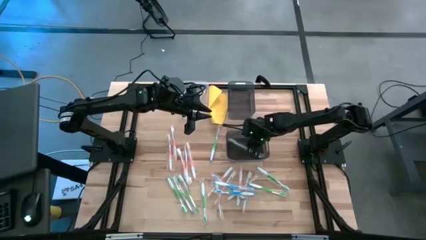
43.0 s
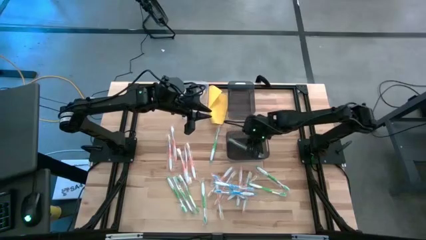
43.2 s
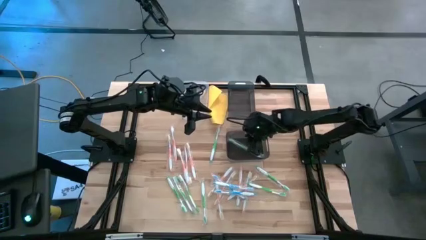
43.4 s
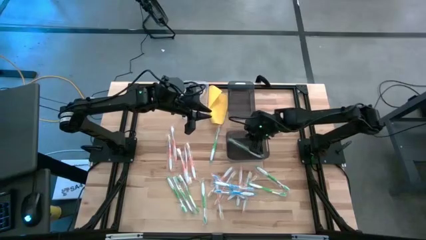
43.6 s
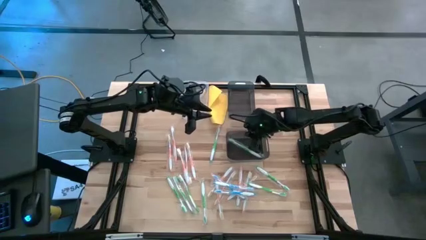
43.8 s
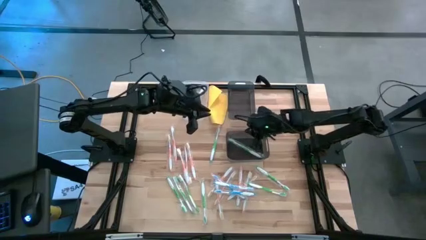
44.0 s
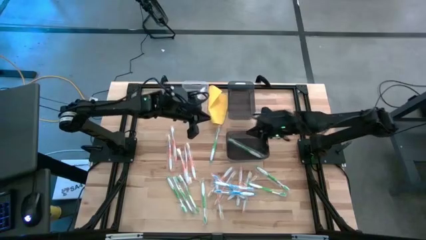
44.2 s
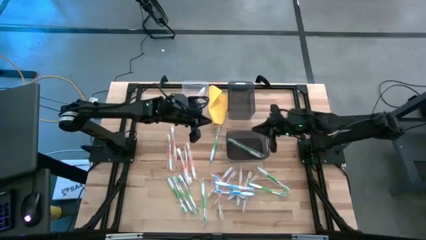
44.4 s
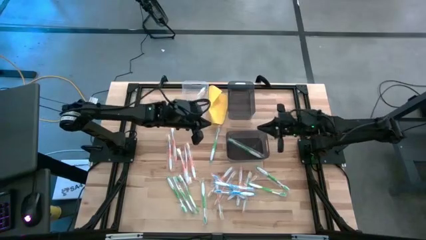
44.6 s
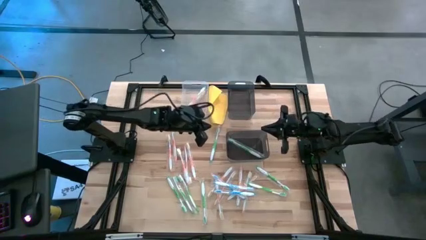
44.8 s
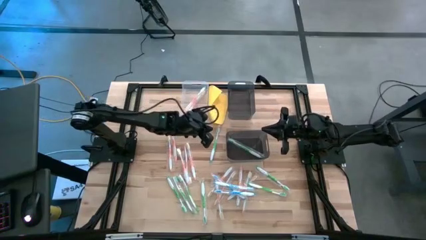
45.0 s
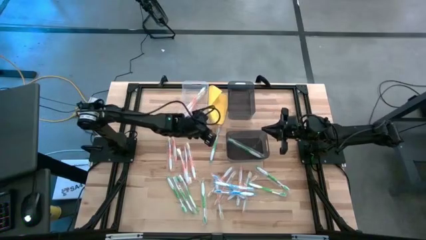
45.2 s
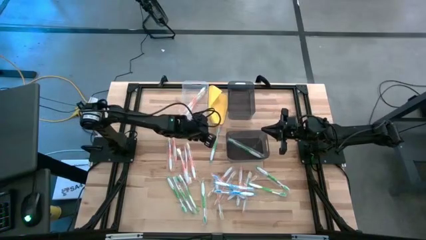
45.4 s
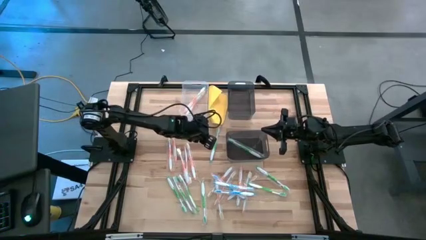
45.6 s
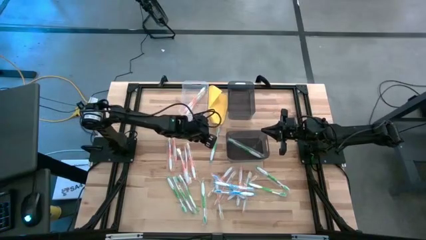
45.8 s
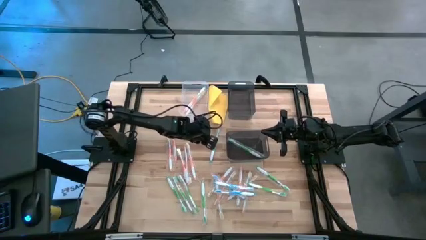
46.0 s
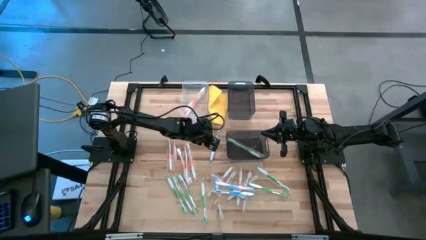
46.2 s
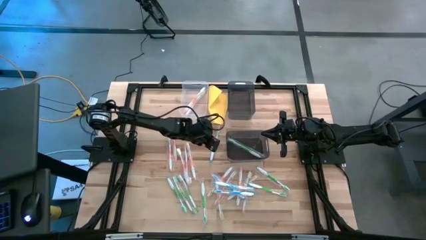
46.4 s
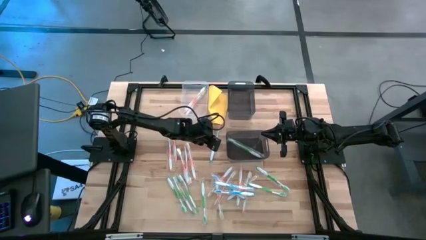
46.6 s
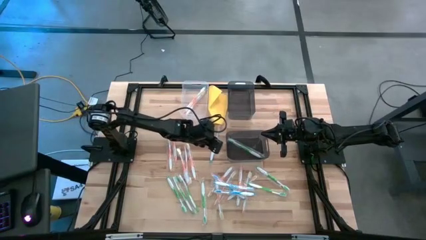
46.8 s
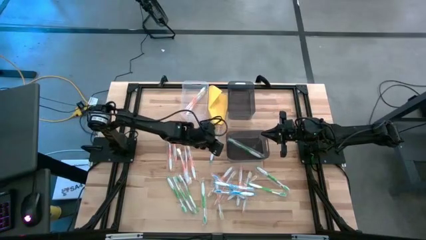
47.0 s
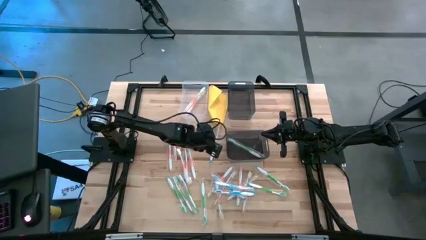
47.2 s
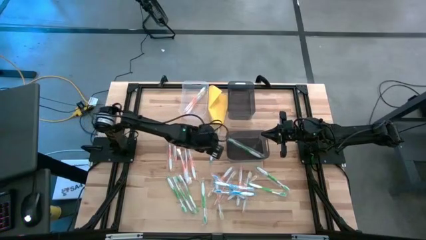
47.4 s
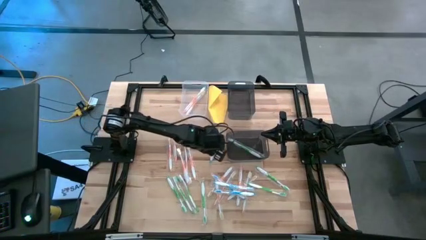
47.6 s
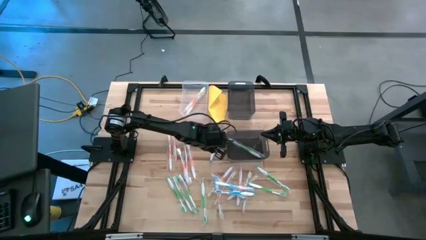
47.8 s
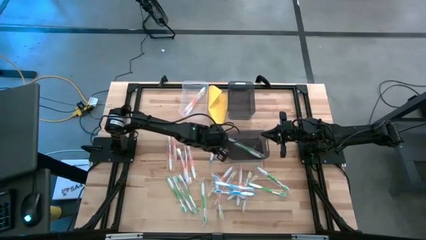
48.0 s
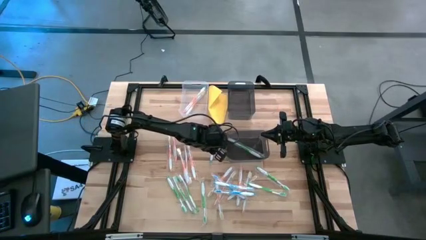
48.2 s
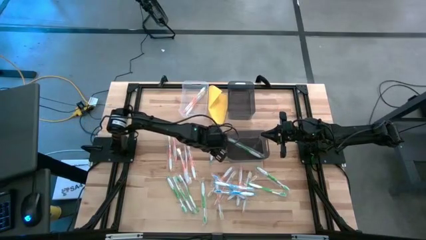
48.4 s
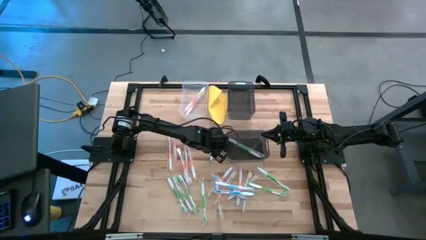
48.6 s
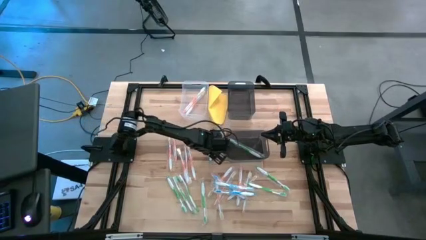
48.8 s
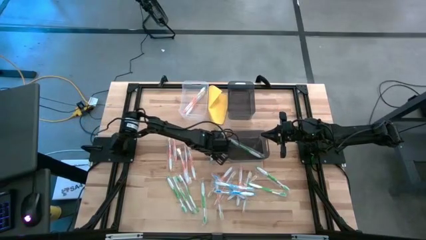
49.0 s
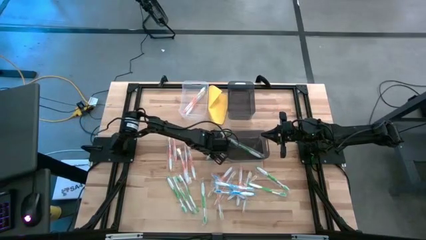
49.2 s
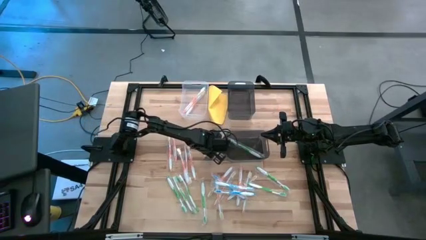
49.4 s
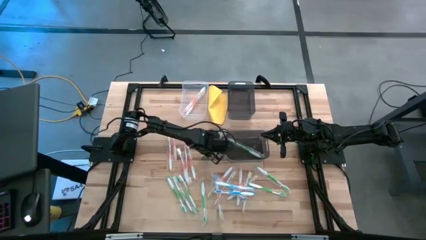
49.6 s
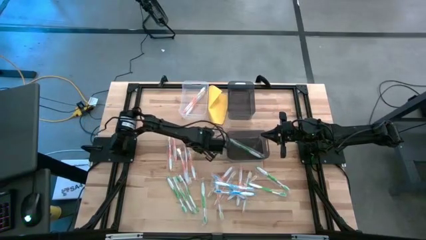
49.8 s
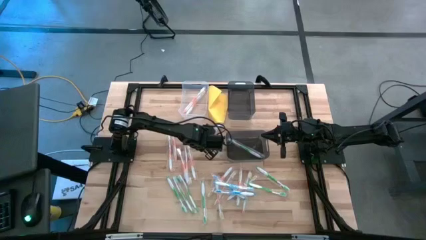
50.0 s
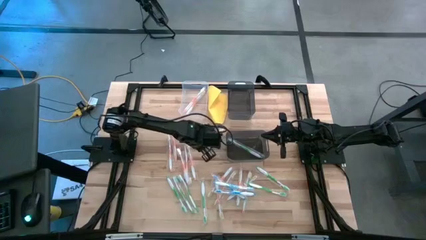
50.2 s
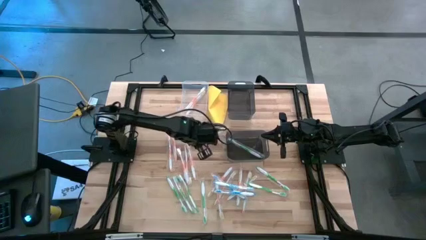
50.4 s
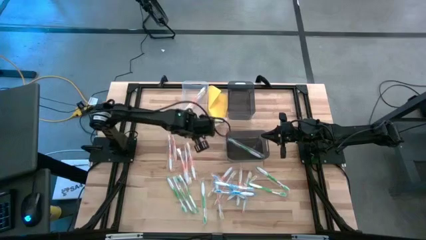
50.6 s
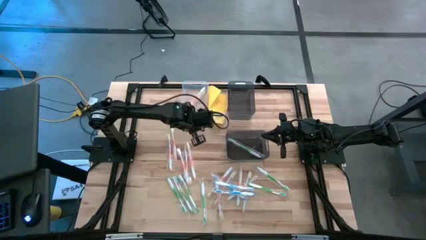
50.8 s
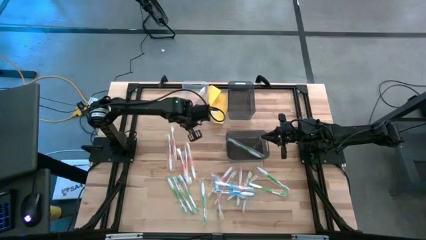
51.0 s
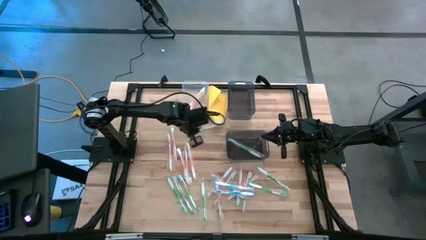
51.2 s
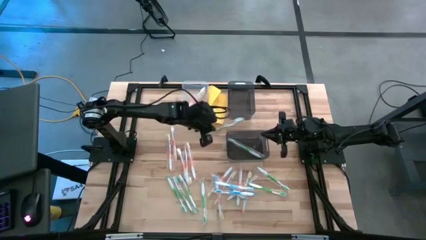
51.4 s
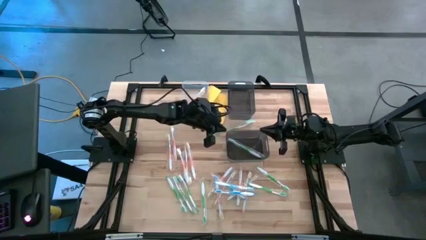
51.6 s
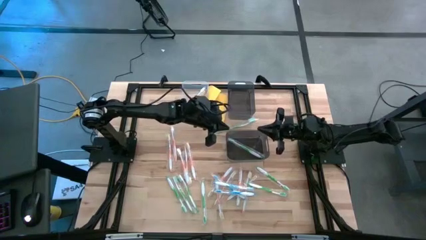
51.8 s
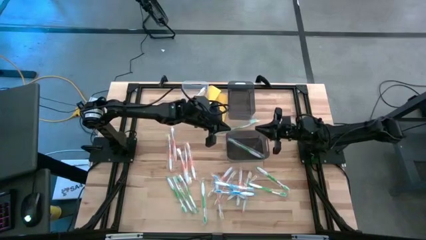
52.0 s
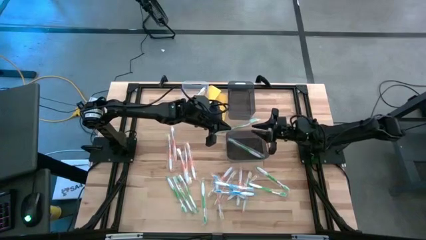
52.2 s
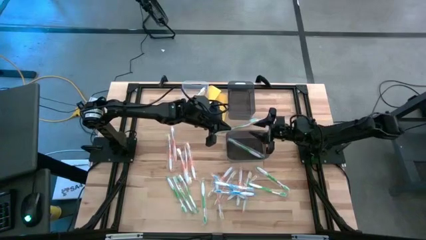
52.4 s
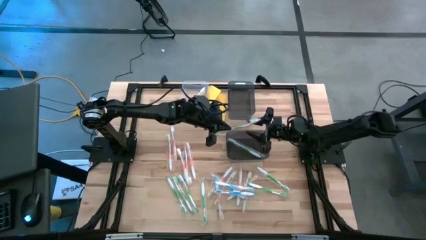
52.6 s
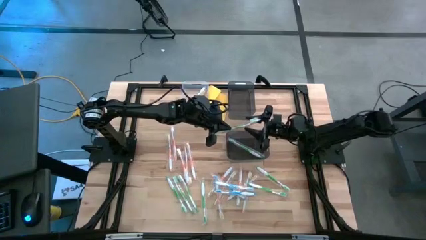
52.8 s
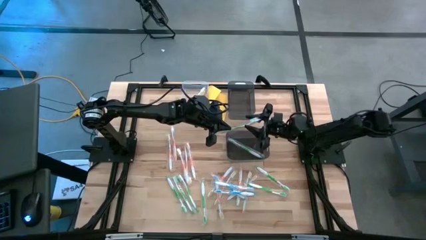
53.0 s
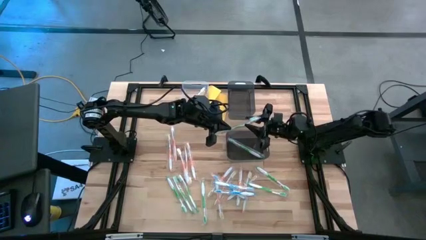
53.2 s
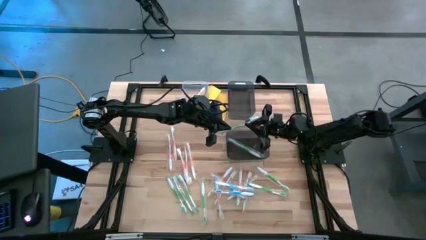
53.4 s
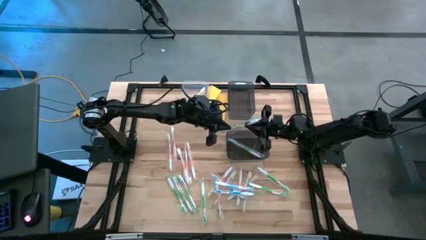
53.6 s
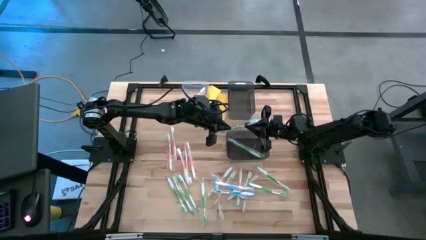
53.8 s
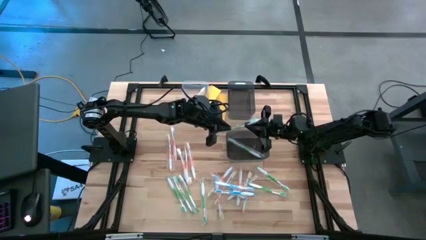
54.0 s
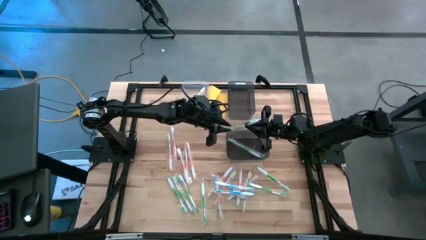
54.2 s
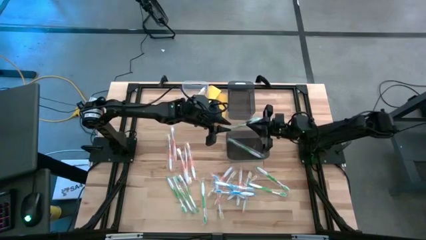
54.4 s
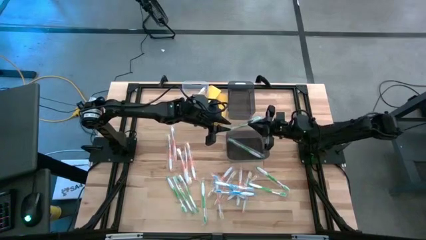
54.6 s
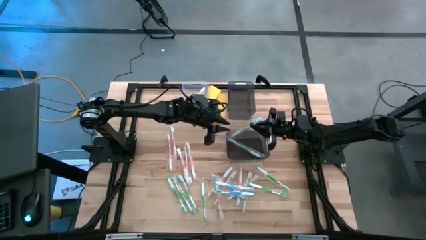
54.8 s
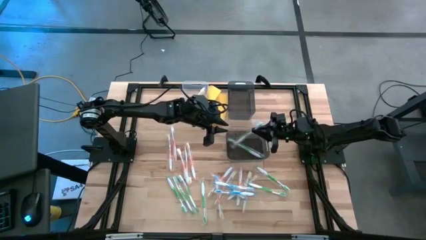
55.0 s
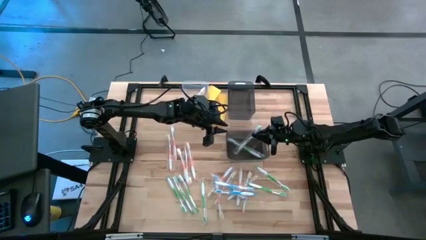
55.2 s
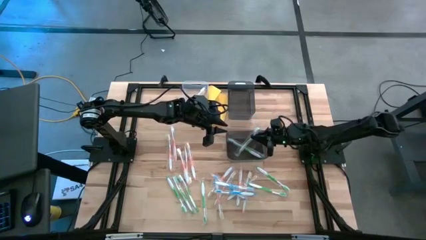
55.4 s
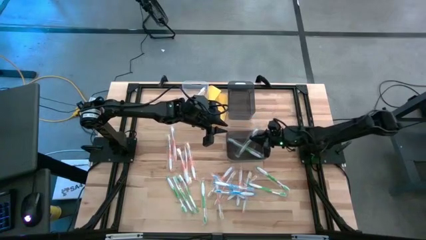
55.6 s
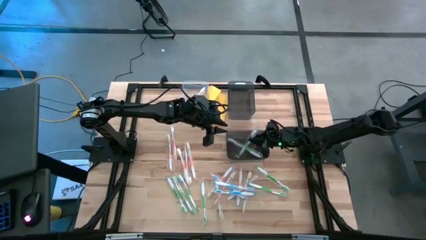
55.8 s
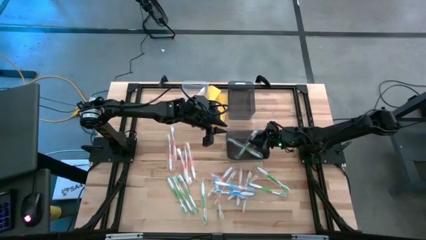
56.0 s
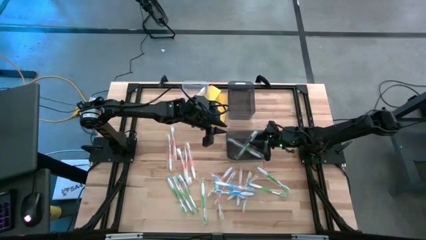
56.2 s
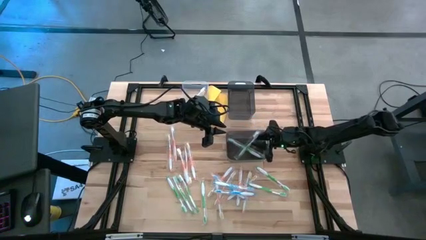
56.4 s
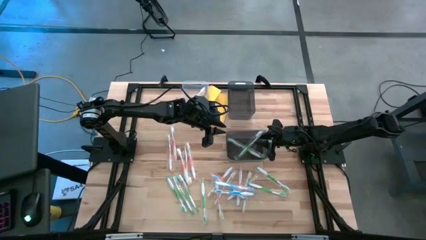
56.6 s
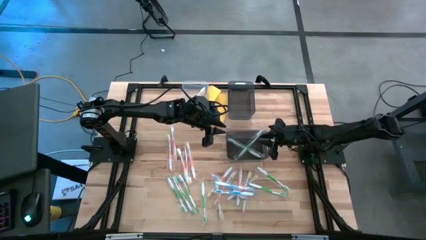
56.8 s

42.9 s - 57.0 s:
Task: Pick & Place Toothbrushes
Put the green toothbrush into the bottom black transparent bin

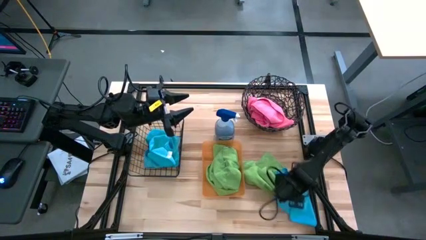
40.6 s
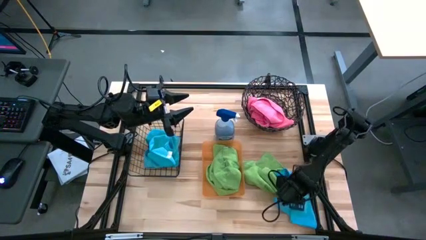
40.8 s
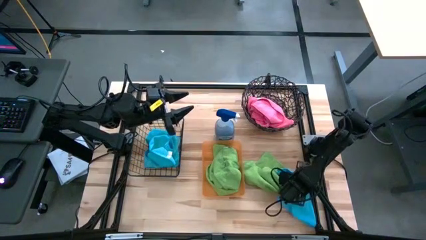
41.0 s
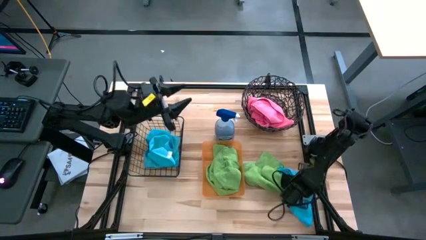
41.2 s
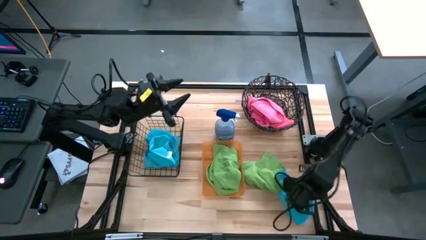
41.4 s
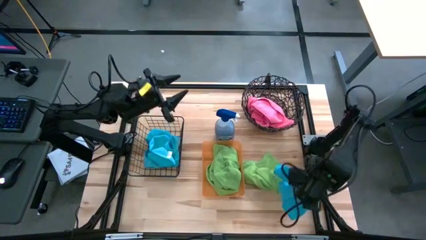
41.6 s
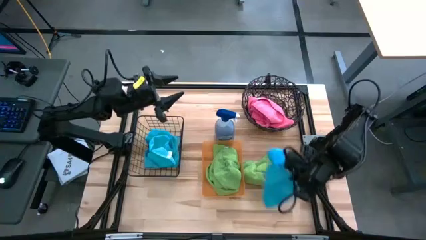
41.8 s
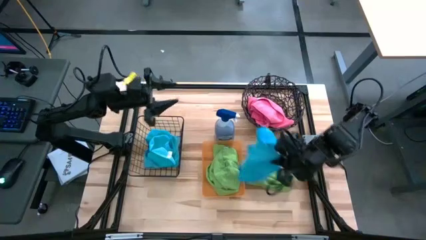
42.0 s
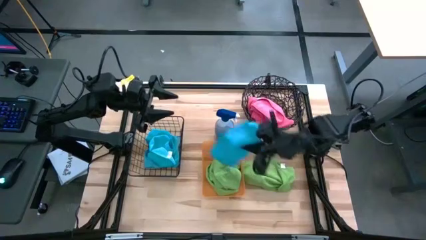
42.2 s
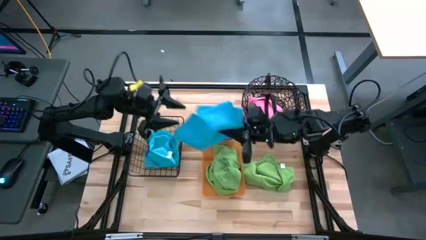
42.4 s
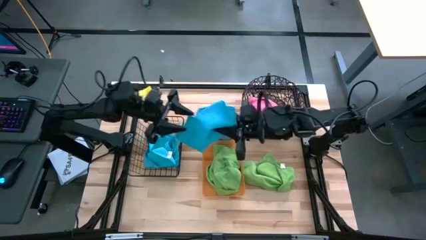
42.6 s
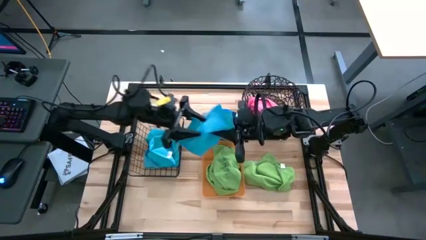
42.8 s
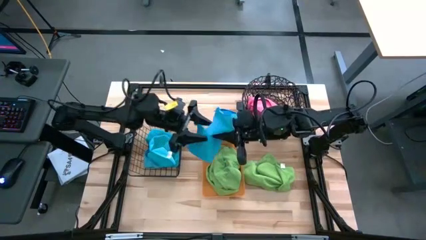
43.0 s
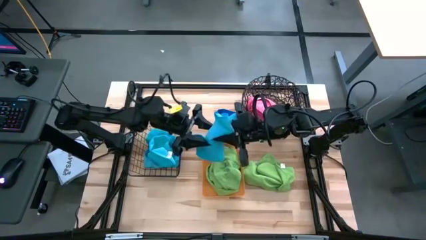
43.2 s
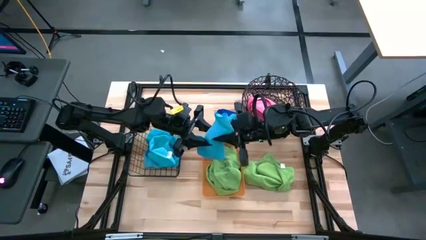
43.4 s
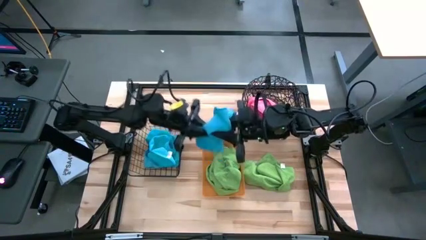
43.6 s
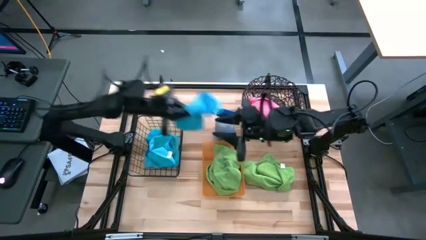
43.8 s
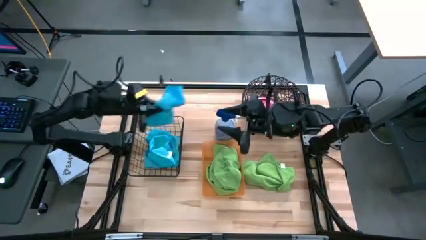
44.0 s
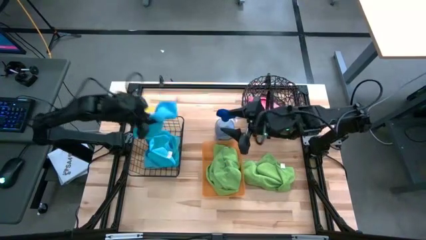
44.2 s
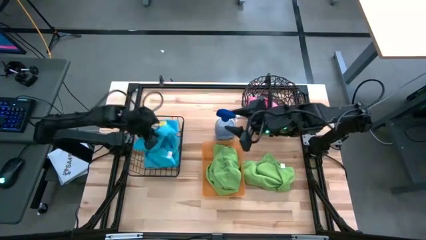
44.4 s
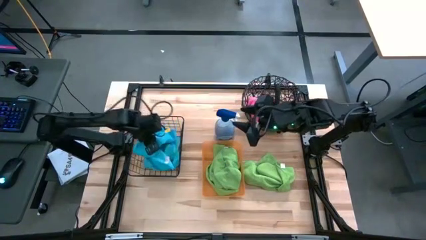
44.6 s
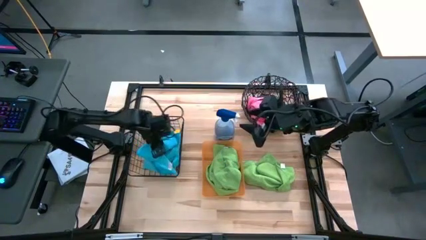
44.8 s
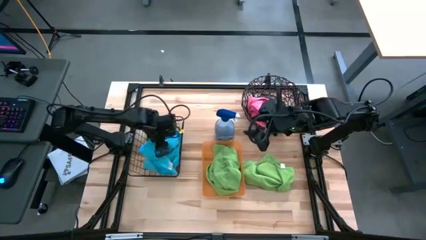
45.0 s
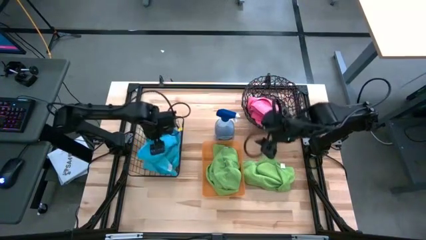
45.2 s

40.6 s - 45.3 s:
Task: Sort microfiber towel by color & place in baskets
Put the blue microfiber cloth into the wire basket
